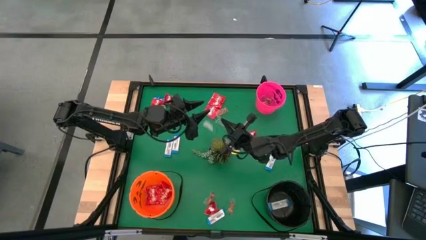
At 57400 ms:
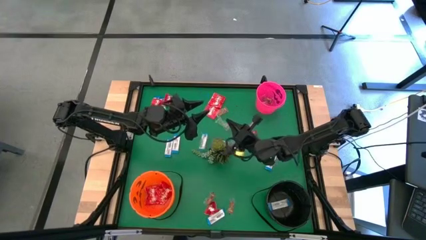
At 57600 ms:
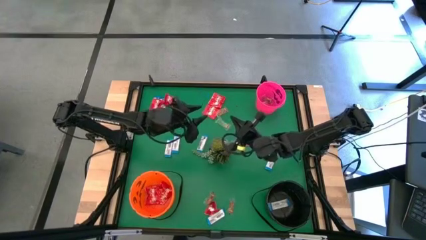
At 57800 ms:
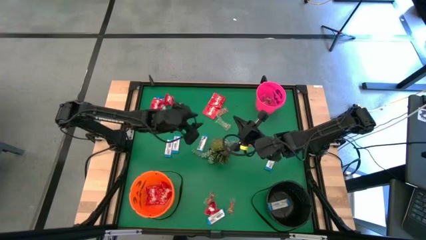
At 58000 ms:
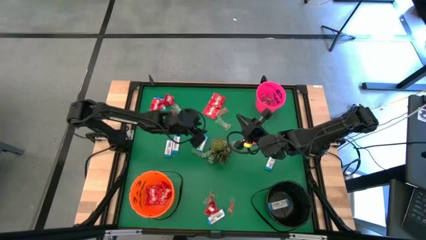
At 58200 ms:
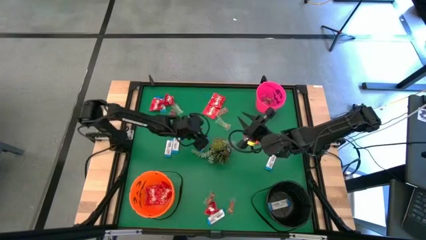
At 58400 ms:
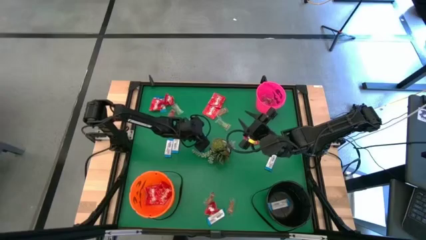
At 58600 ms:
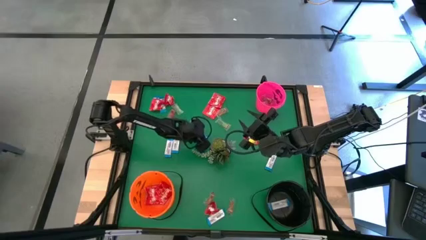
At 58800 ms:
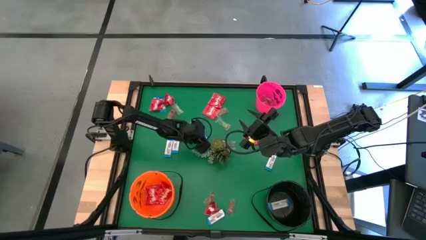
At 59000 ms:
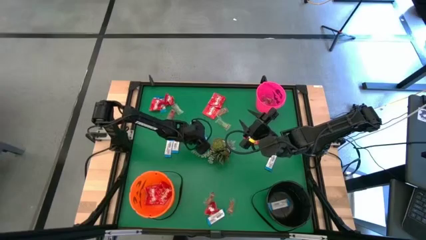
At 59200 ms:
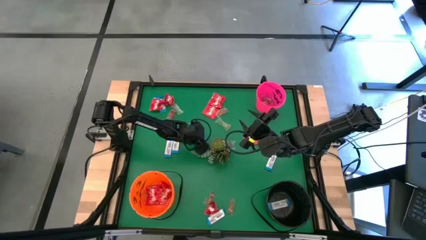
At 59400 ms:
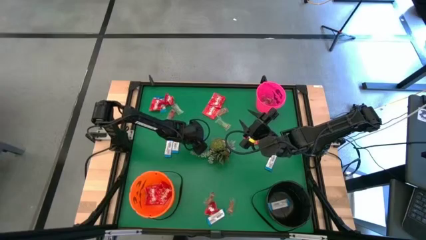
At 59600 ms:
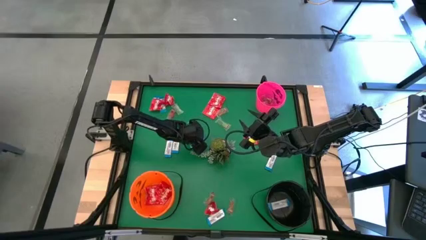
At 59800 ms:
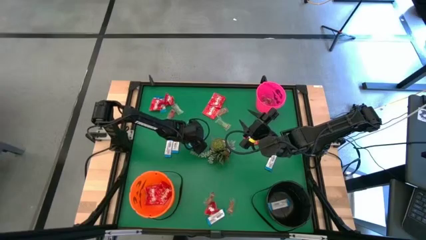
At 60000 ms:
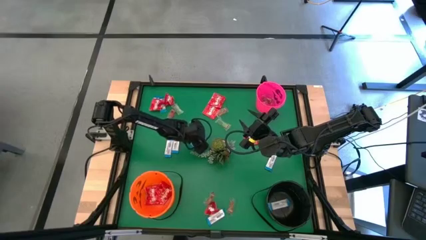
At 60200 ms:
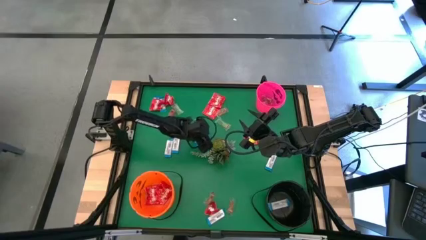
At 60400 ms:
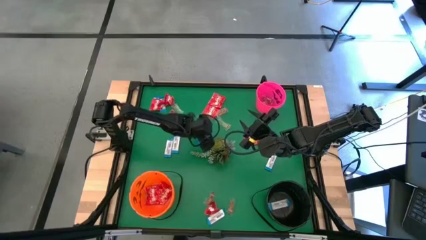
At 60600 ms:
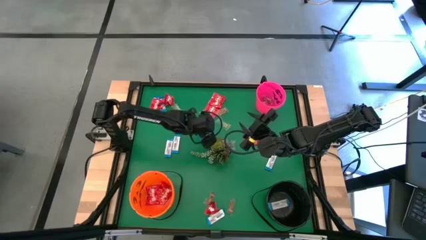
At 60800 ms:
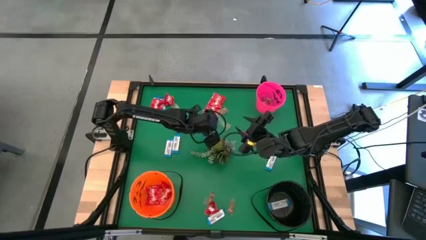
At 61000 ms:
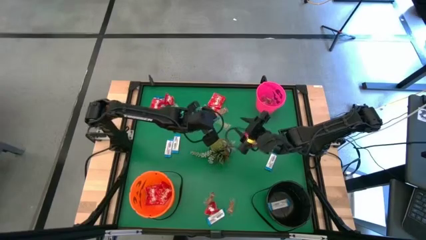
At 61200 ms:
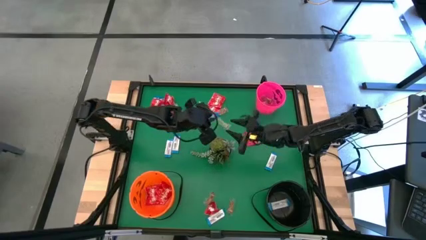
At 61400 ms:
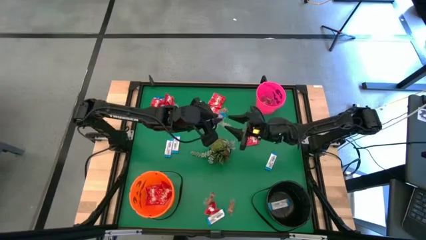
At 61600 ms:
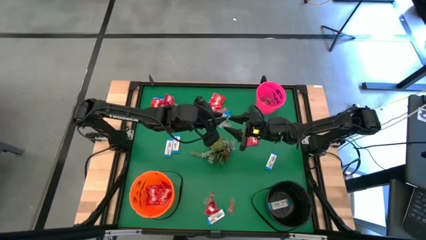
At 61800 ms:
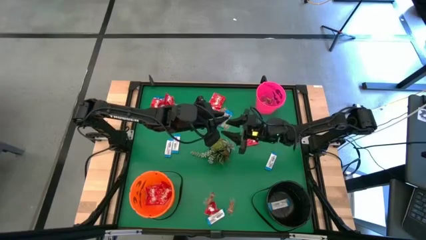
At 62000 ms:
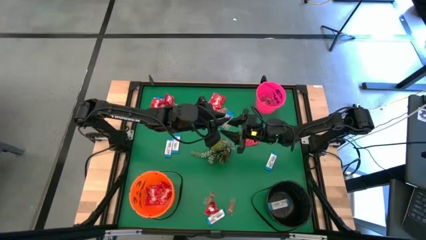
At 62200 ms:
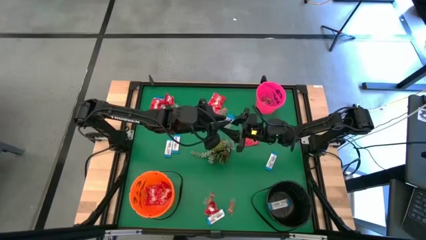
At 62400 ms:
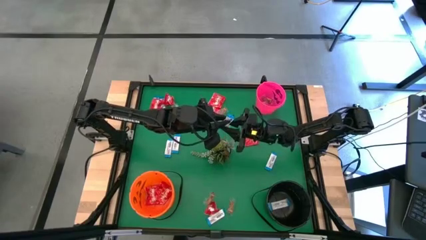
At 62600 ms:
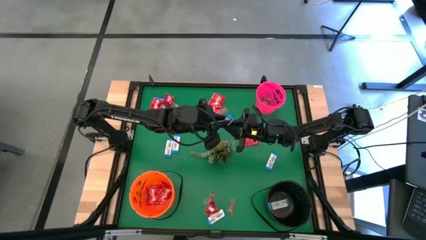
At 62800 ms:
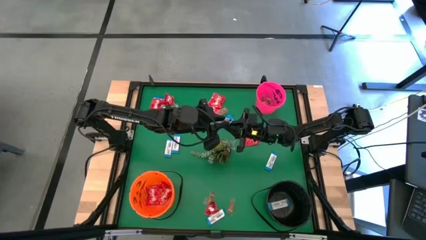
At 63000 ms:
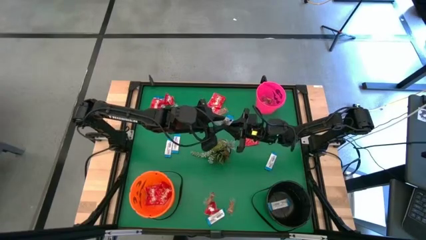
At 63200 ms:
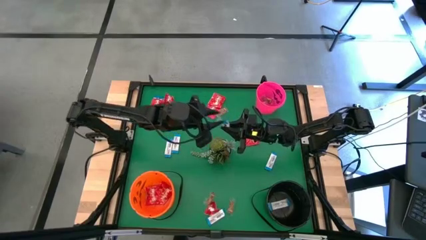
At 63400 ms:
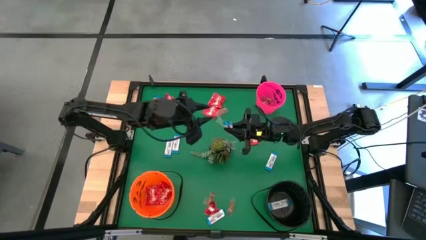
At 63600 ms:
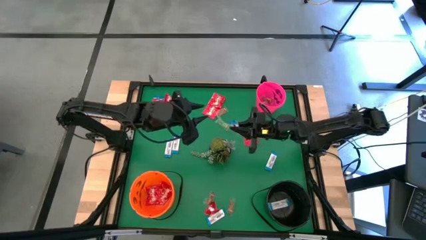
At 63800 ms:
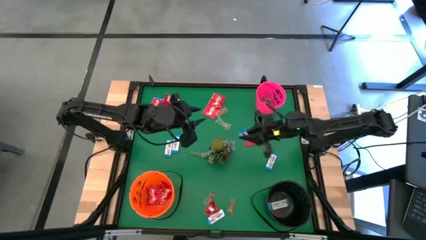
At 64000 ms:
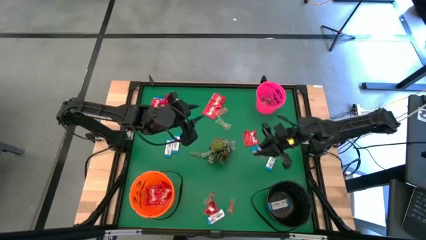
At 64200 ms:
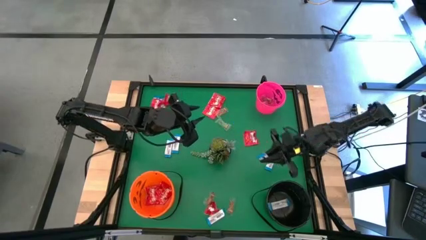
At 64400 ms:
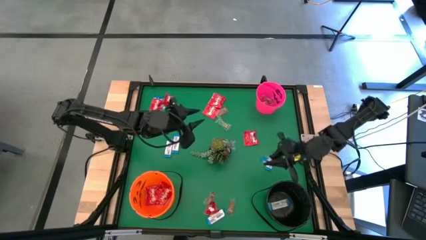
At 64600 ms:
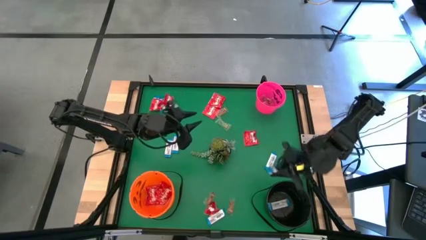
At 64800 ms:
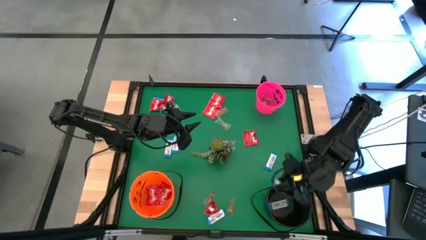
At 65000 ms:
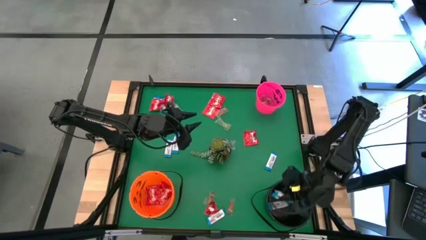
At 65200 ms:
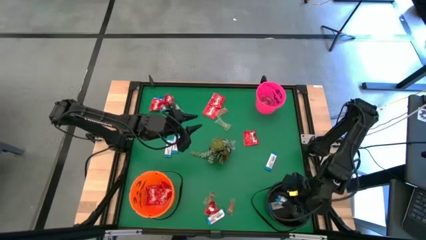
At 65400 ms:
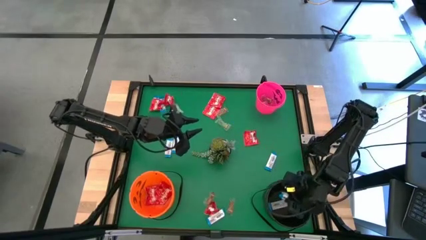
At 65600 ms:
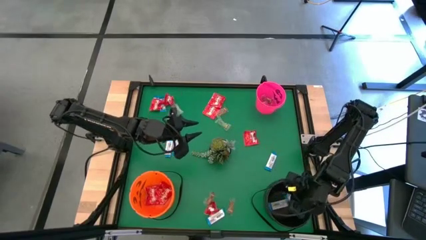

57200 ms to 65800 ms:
Task: Sort candy
Put the white chocolate into the black bucket

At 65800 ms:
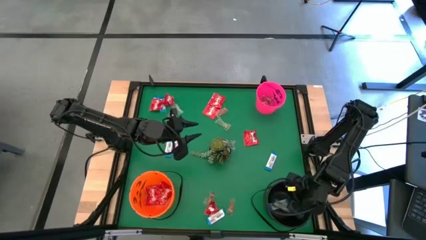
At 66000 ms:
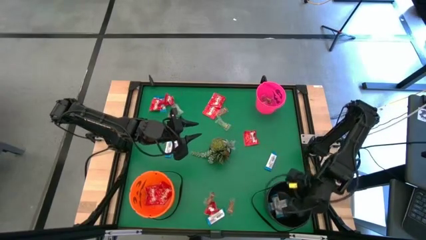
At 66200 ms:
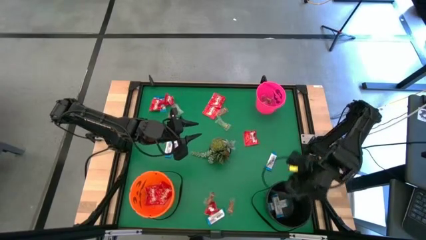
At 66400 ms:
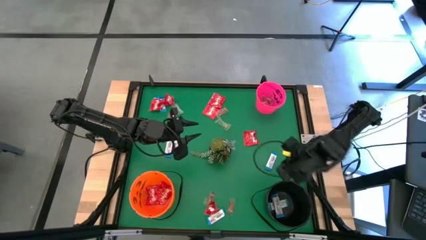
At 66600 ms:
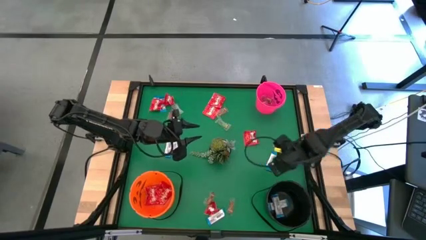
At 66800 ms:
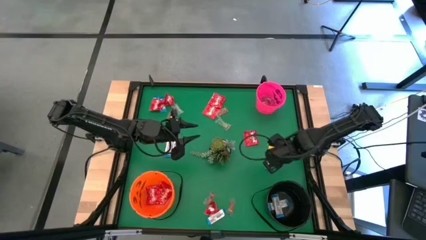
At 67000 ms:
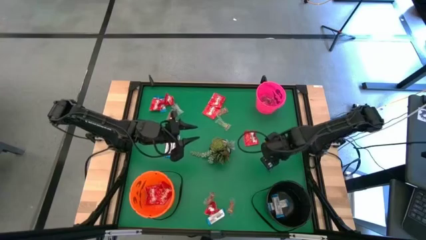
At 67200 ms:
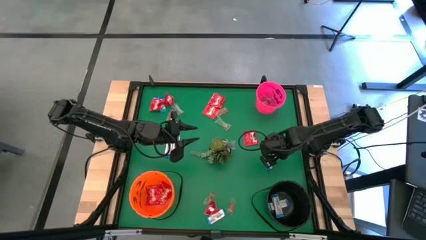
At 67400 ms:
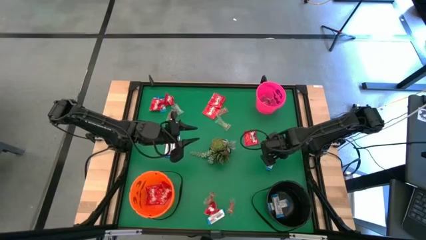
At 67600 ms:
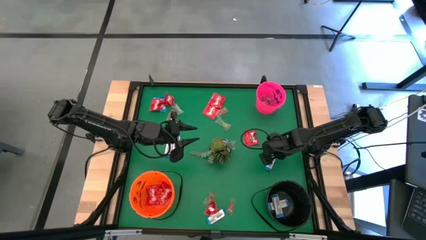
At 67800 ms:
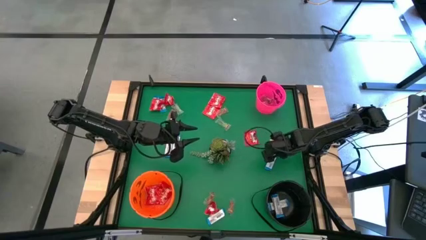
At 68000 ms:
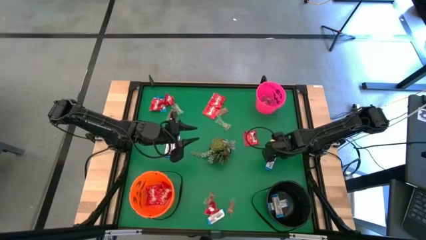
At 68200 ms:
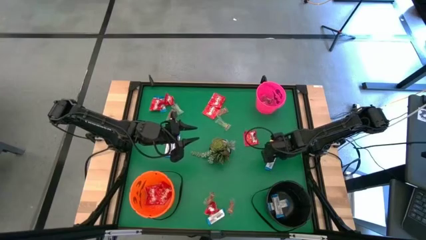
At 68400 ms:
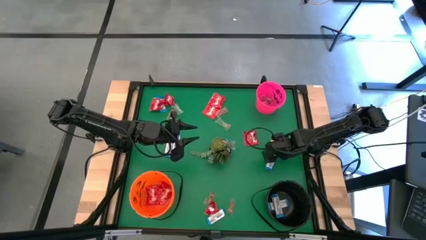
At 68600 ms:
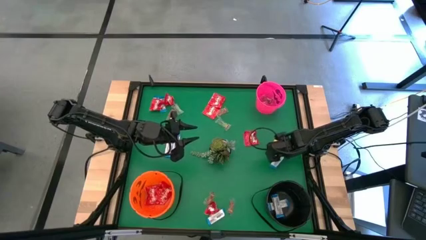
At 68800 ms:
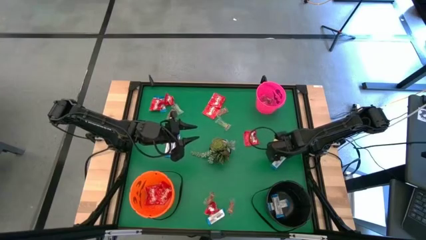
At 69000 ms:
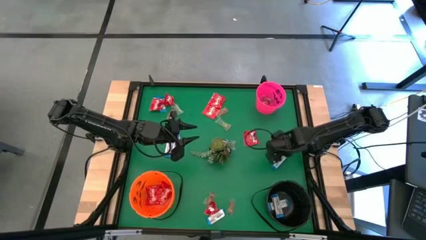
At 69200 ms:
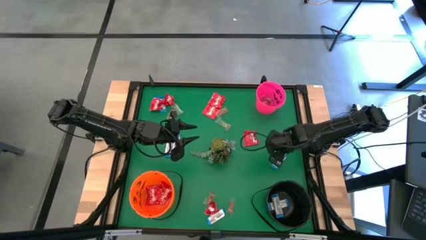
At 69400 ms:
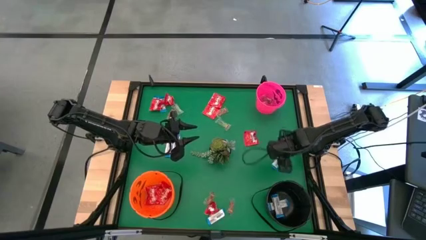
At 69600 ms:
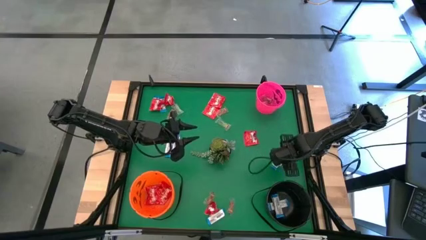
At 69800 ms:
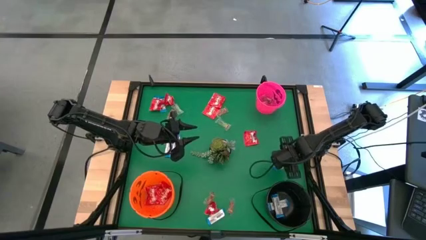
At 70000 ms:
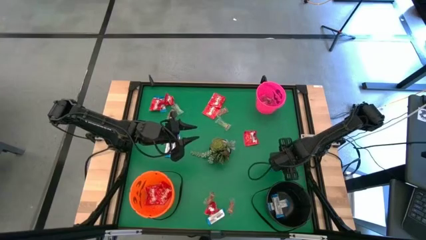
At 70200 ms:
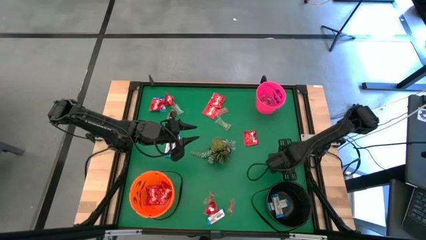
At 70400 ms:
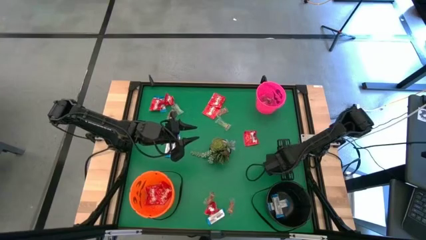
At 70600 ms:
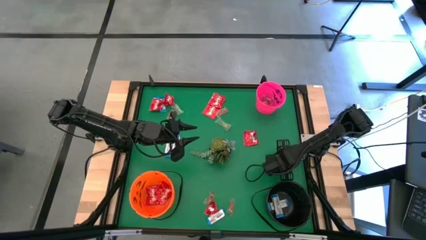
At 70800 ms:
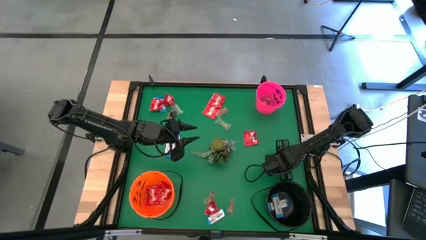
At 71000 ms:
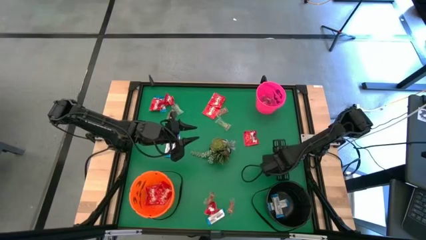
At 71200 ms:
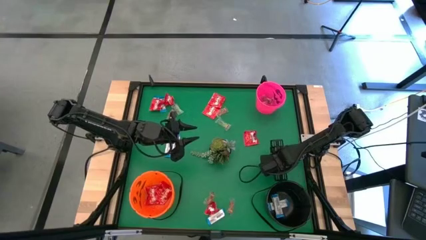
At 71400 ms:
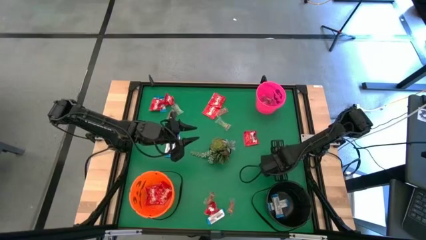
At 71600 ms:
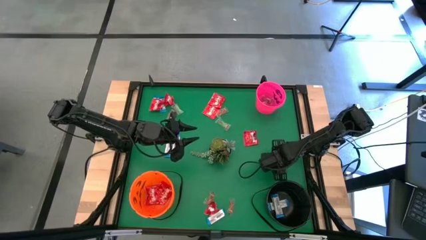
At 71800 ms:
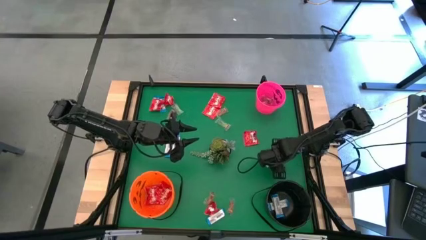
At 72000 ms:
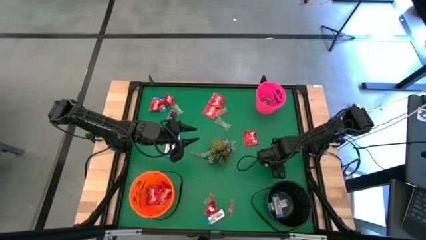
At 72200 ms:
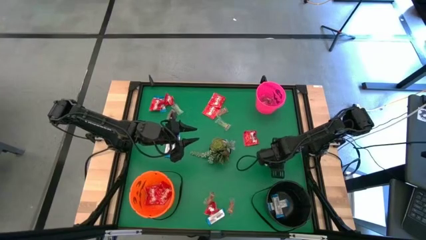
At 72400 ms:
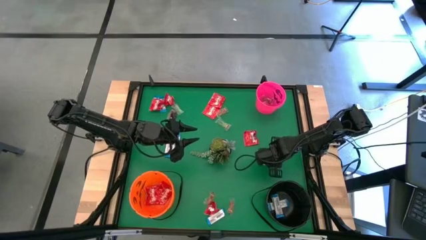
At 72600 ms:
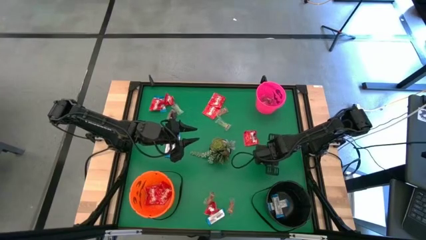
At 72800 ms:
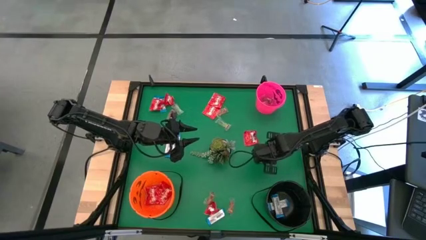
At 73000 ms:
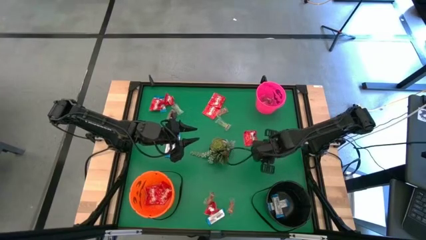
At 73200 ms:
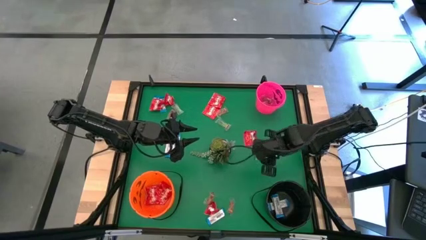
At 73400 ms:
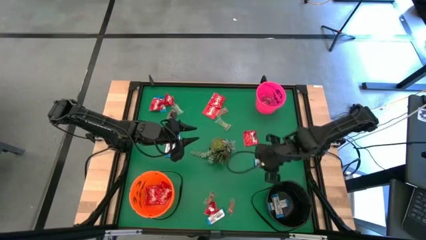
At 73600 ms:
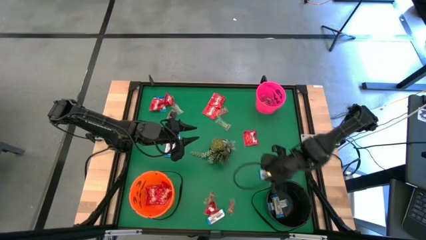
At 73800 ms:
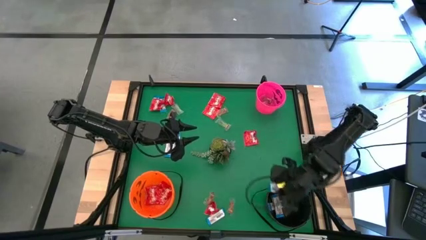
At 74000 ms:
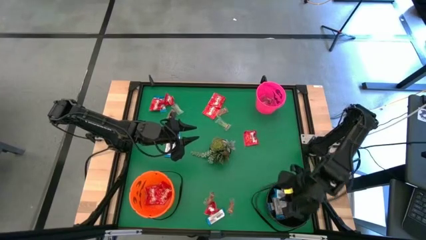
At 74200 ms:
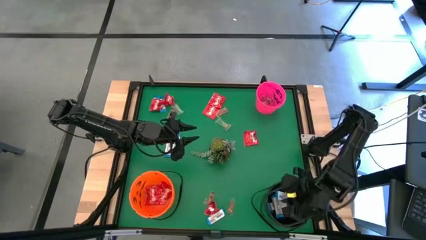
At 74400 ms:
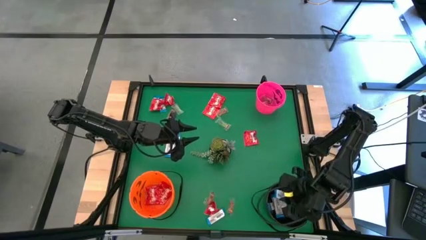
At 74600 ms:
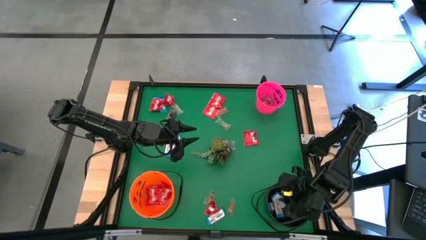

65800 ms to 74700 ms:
Put the white chocolate into the black bucket
